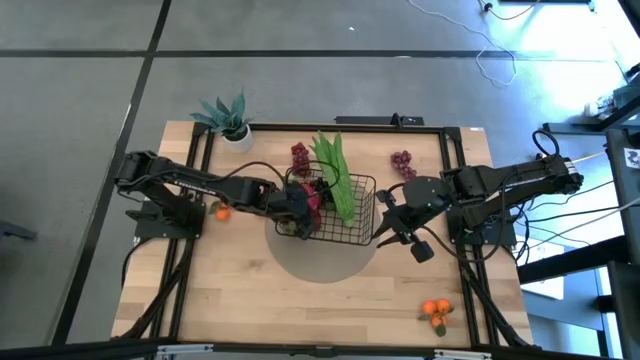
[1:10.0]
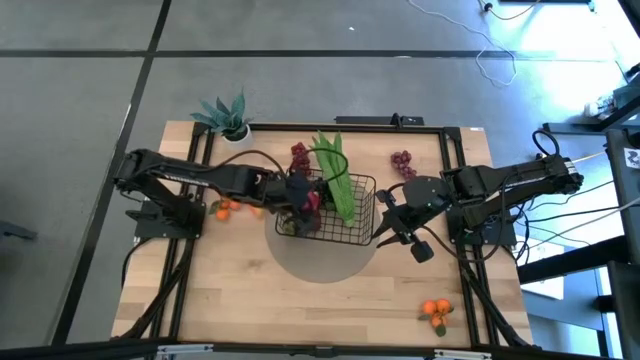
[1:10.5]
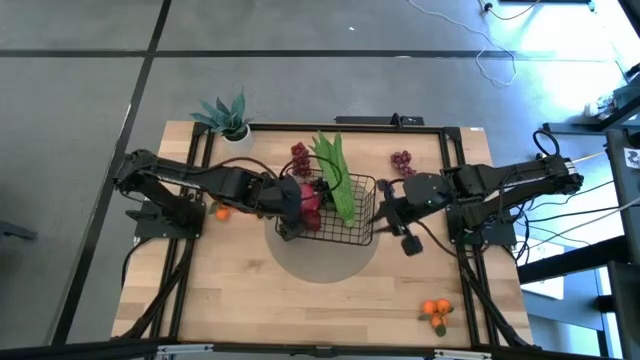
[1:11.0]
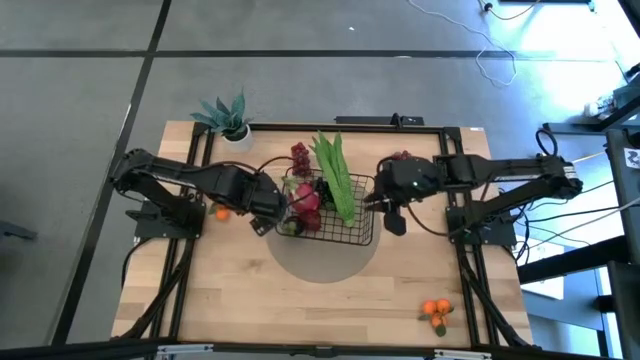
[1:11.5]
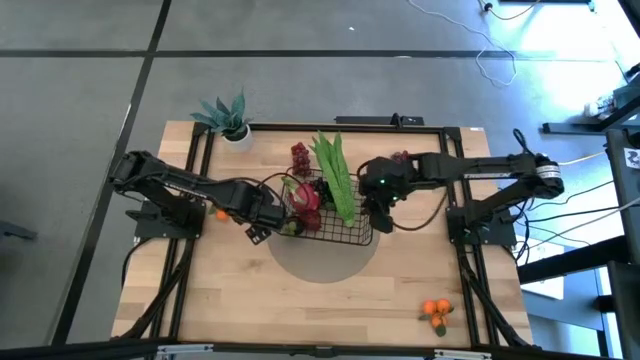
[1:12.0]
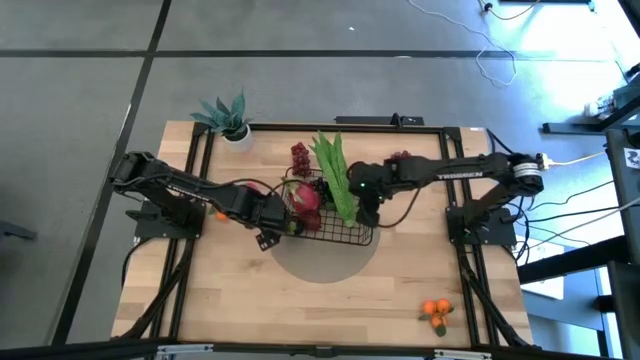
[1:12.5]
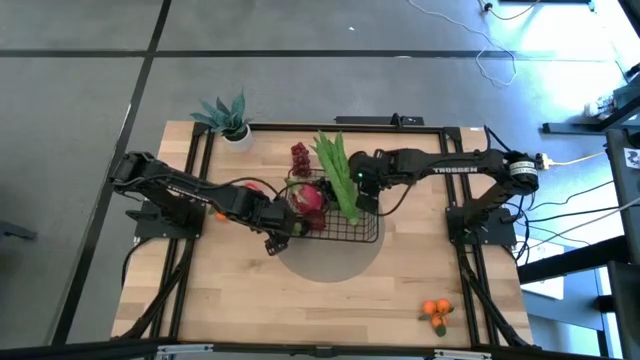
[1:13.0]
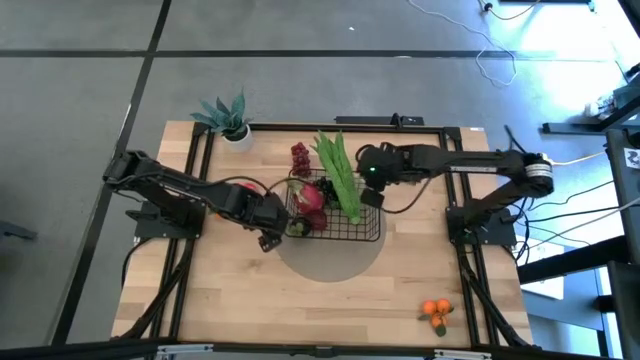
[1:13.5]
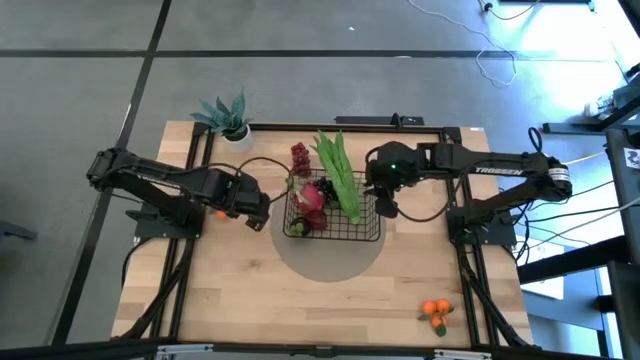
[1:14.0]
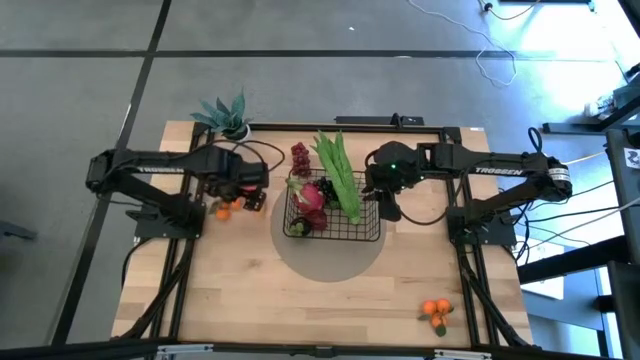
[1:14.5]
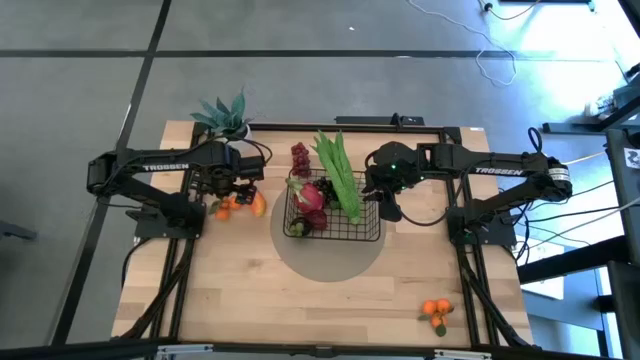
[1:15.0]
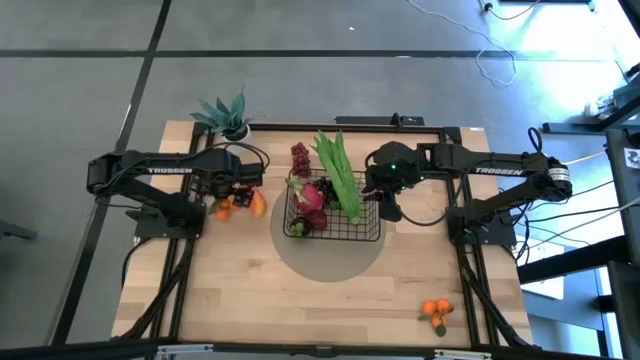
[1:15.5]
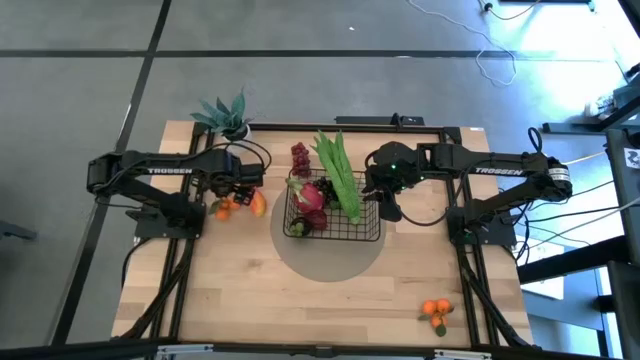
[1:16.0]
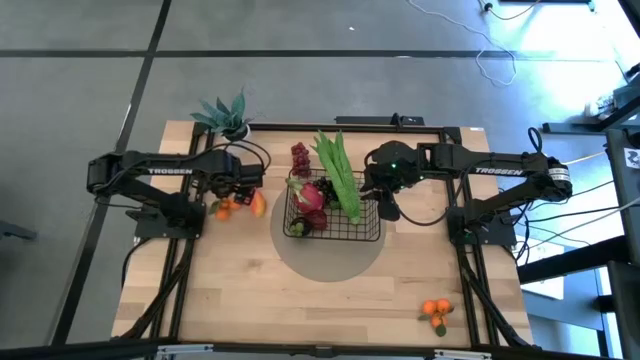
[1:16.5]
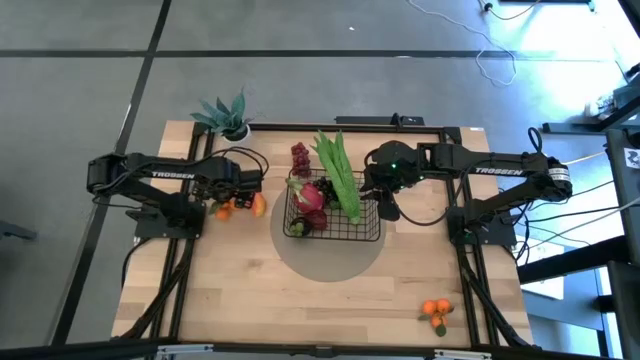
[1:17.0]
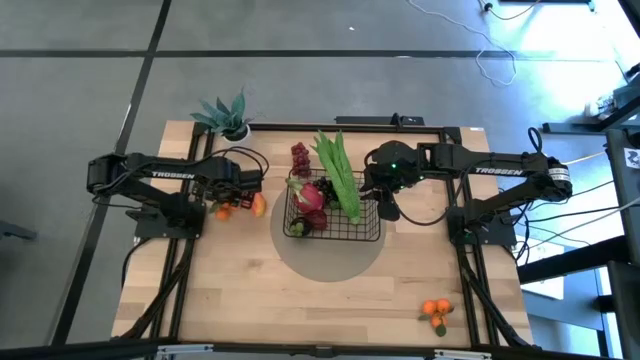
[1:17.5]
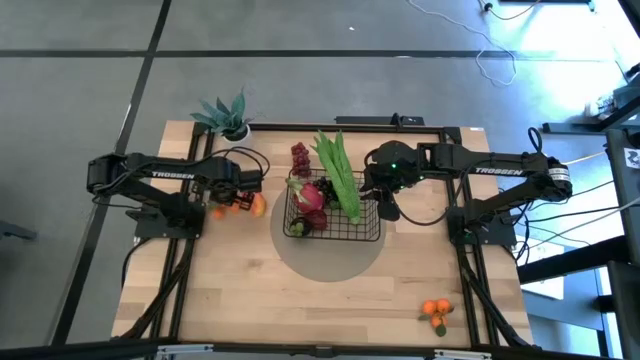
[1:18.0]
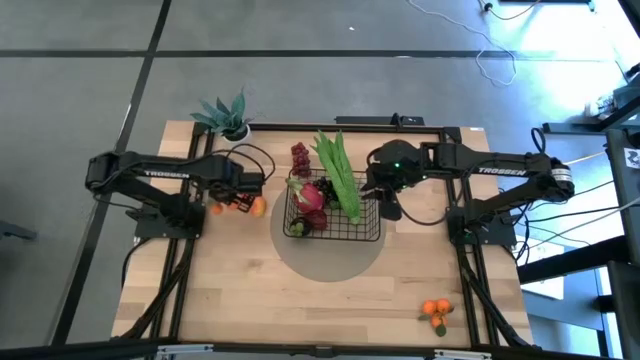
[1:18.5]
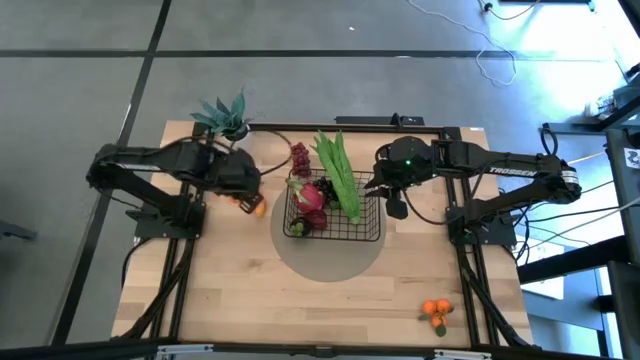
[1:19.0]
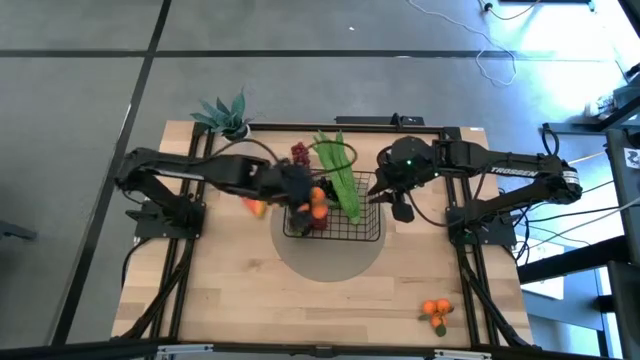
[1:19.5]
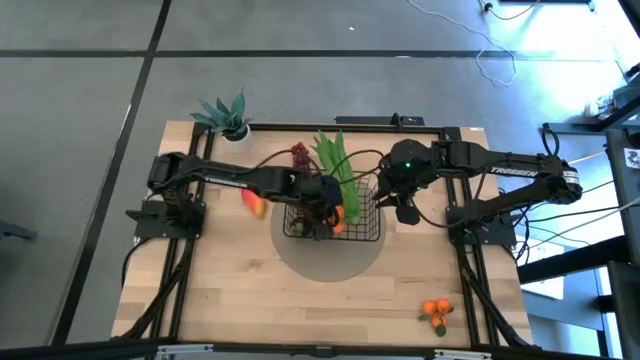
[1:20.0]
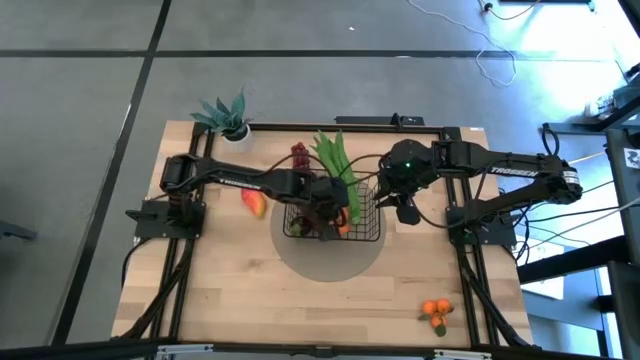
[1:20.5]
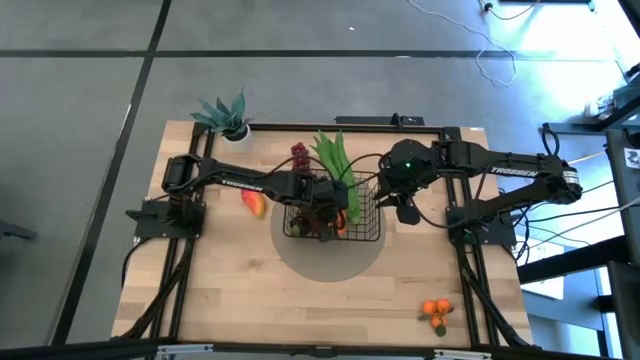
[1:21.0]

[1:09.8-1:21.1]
Task: Build produce basket
Put the top orange tangerines into the black wire basket

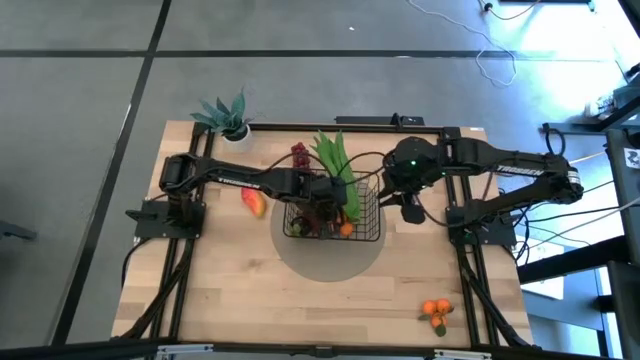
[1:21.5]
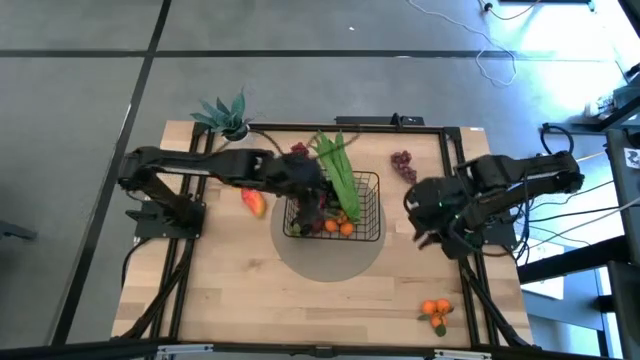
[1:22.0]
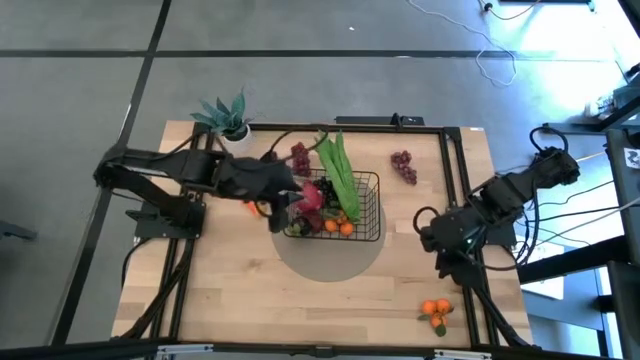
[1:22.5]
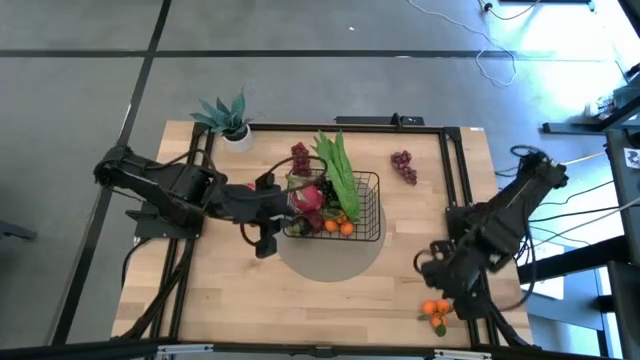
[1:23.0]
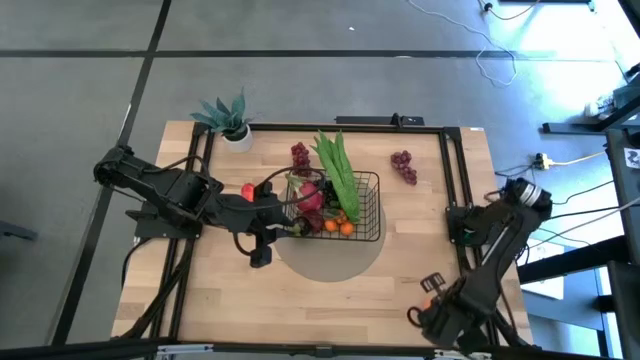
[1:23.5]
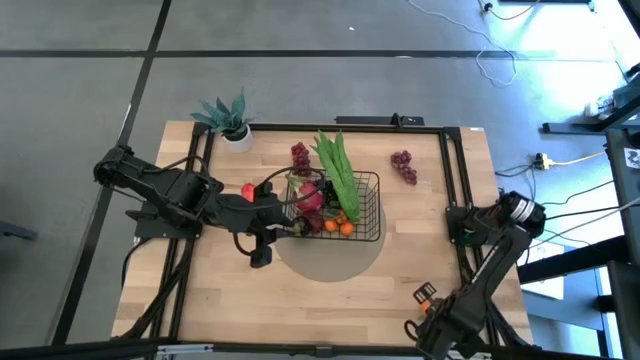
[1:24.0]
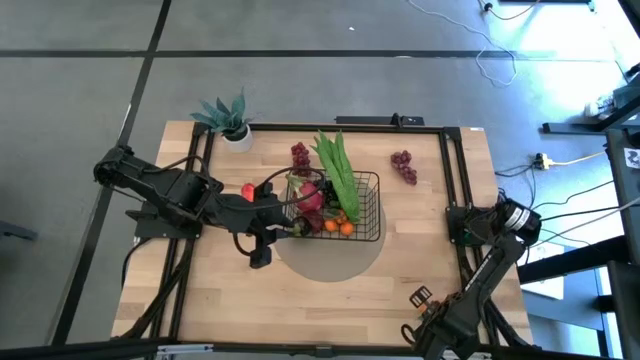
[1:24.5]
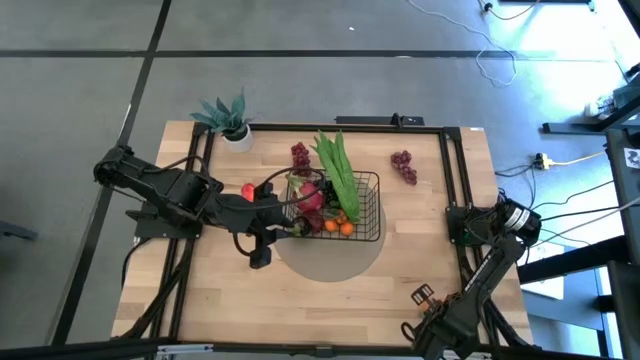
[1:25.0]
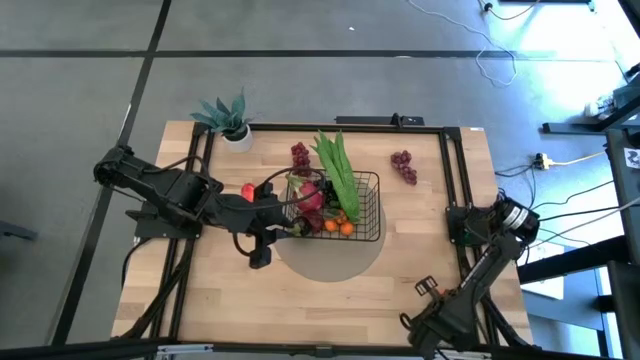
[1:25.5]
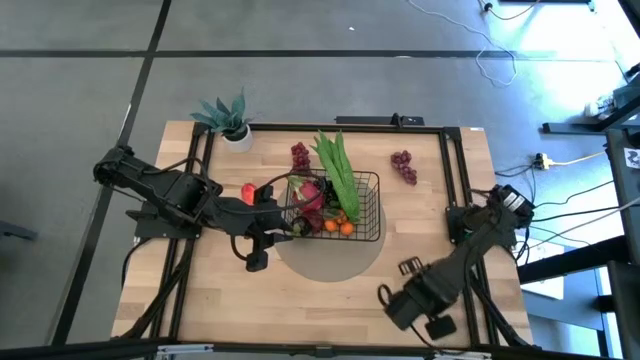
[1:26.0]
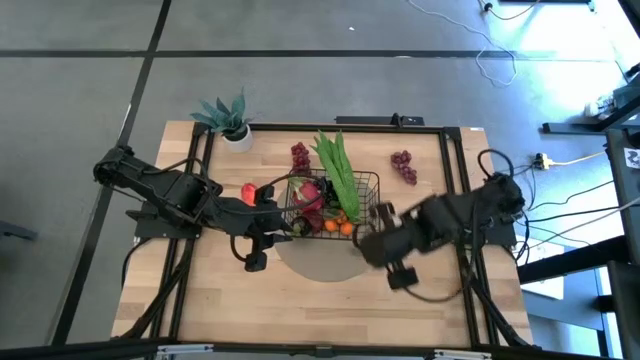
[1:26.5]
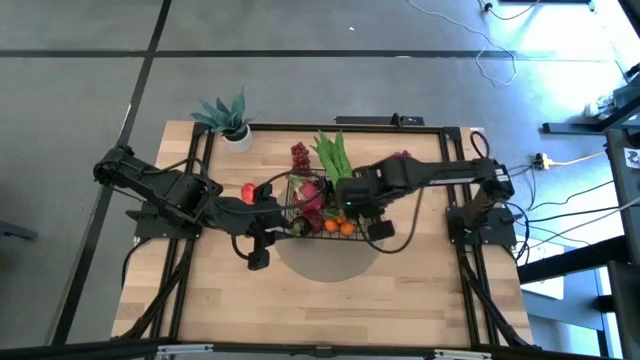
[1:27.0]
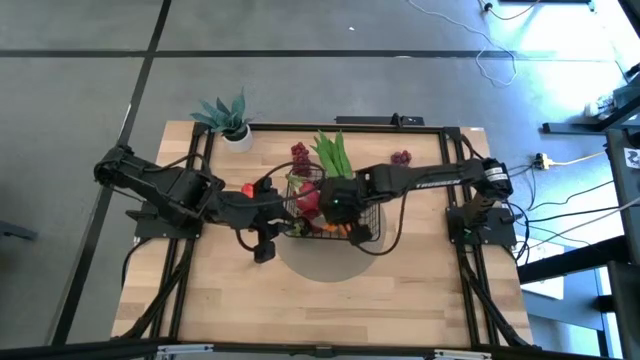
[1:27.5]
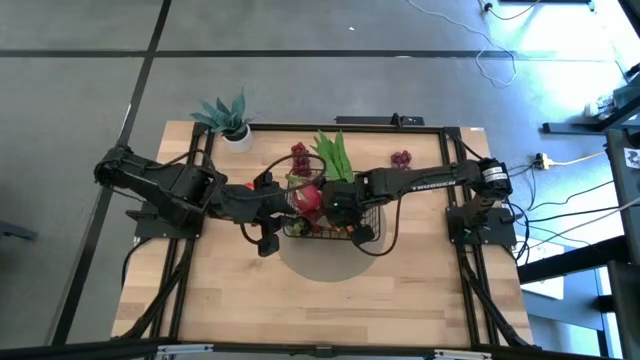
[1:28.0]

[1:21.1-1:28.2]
Put the orange tangerines into the black wire basket

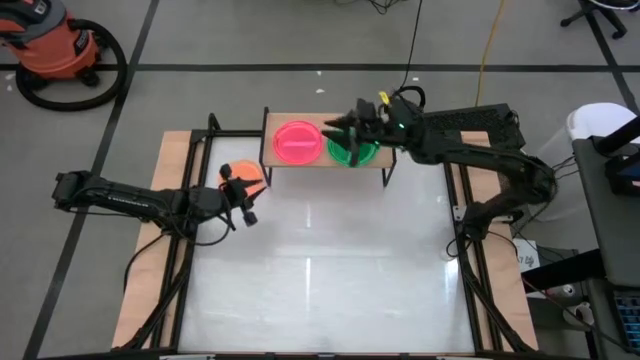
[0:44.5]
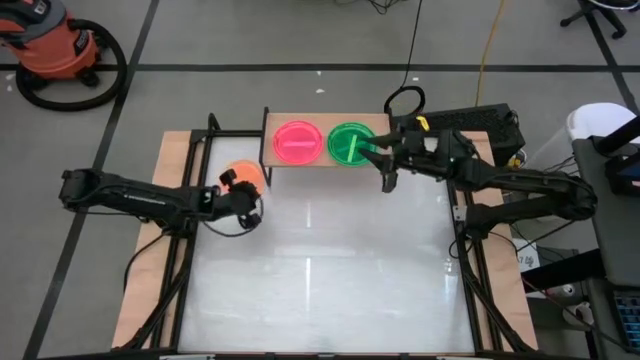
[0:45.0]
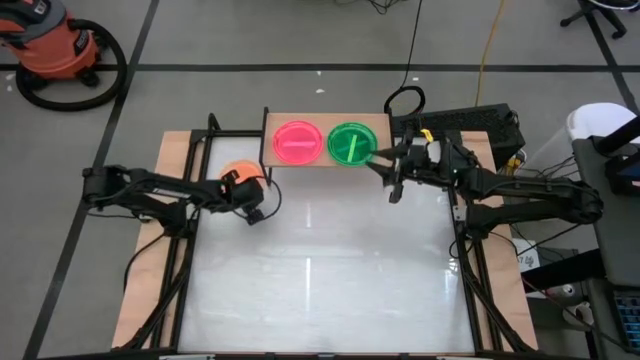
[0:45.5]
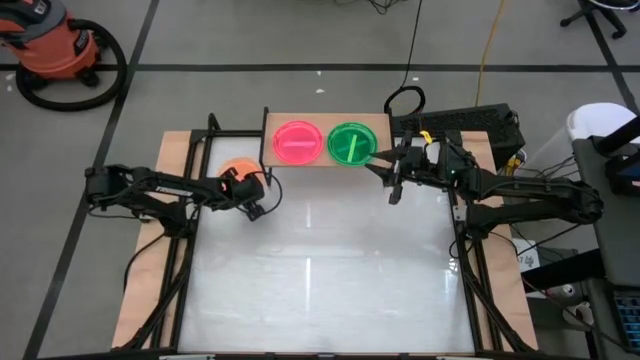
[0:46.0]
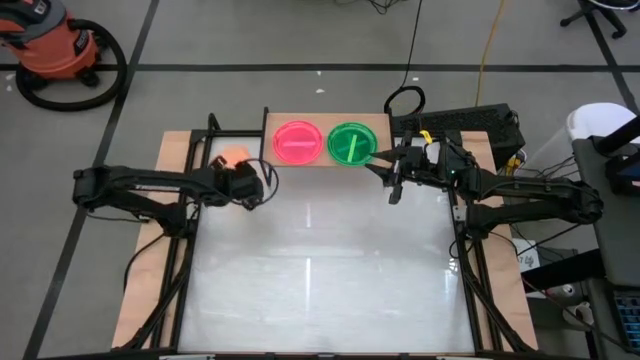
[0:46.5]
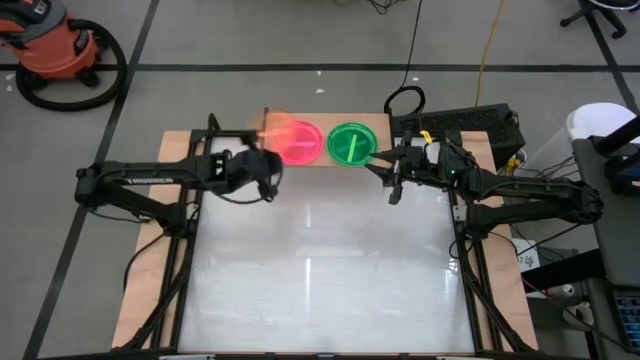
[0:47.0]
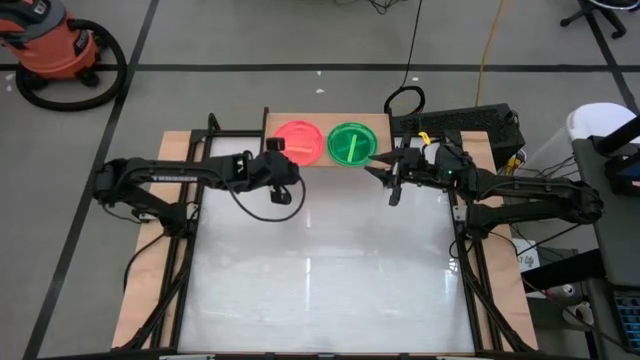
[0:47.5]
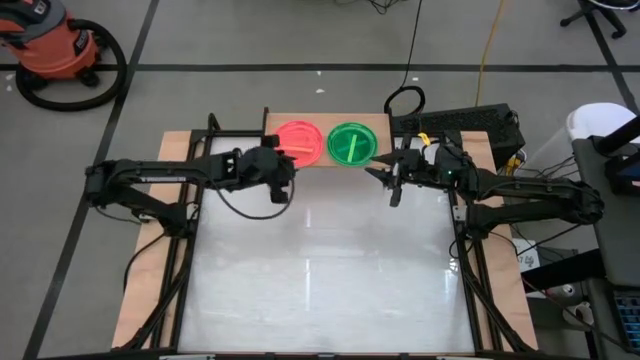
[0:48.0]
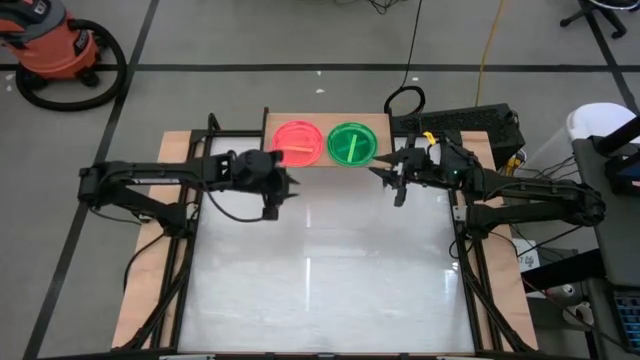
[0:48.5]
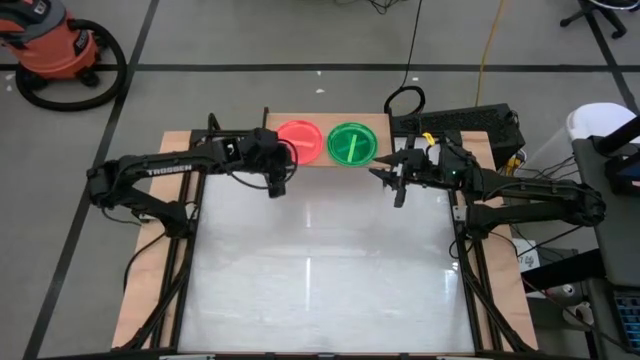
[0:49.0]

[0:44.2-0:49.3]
Task: Place and stack plates onto a shelf
Stack the orange transparent plate onto the pink transparent plate on the shelf
